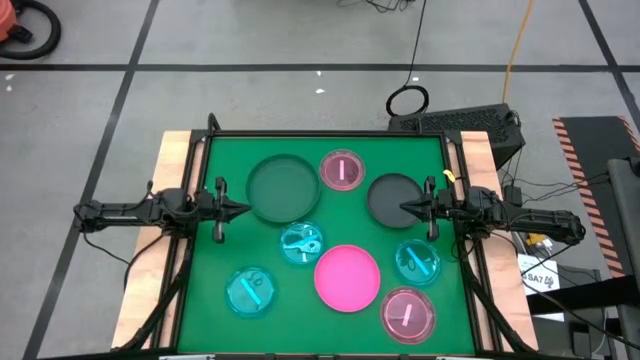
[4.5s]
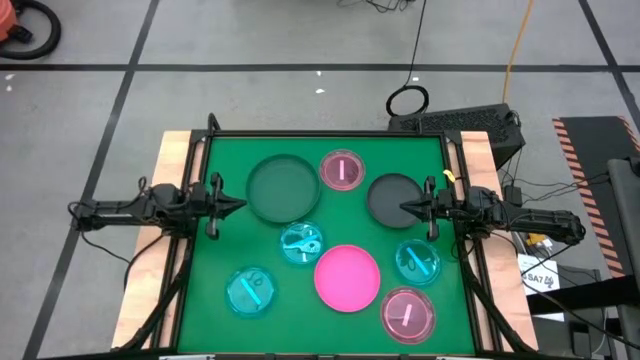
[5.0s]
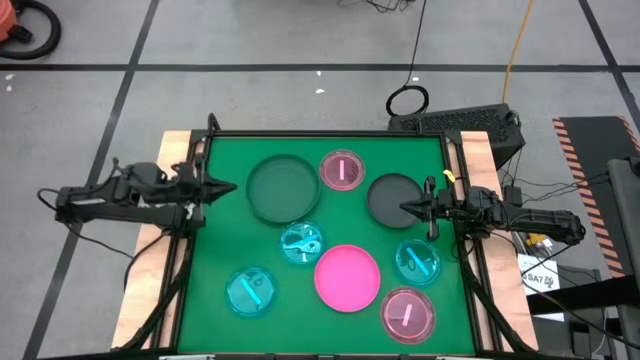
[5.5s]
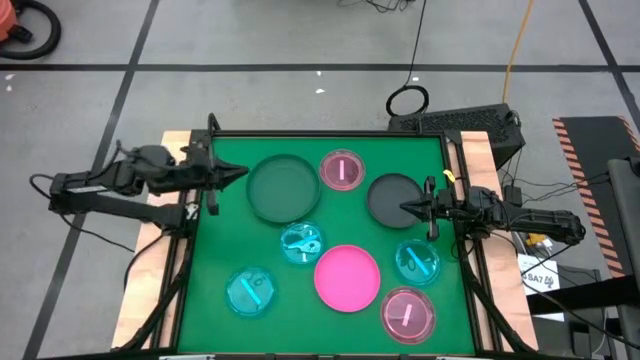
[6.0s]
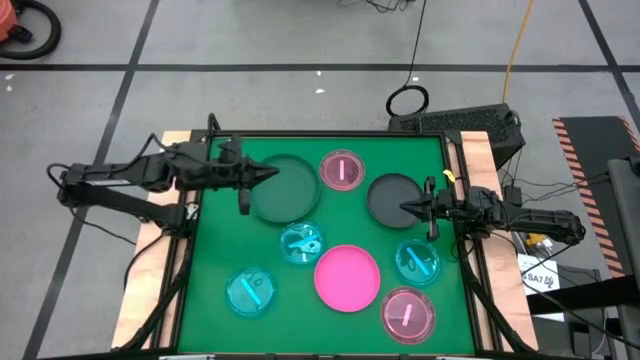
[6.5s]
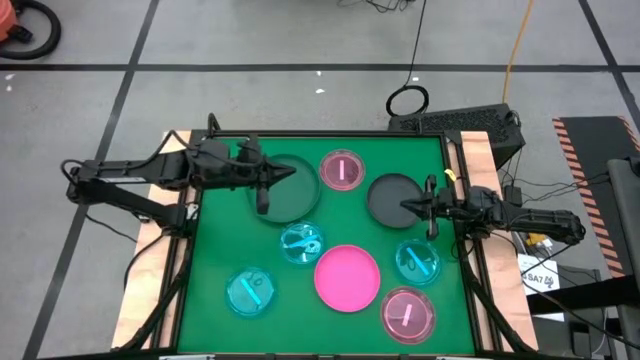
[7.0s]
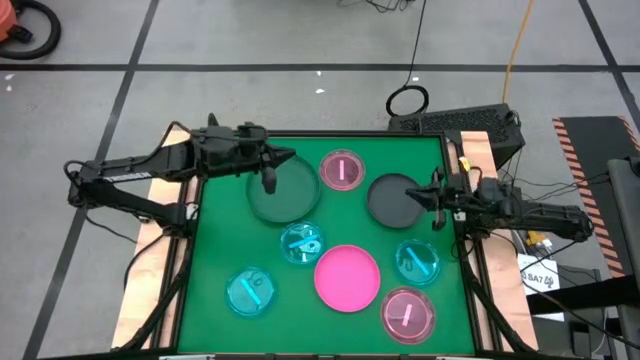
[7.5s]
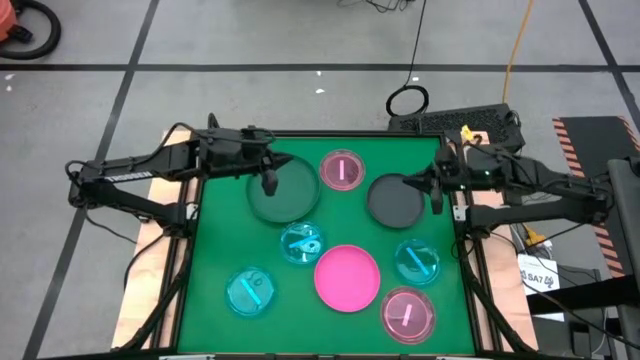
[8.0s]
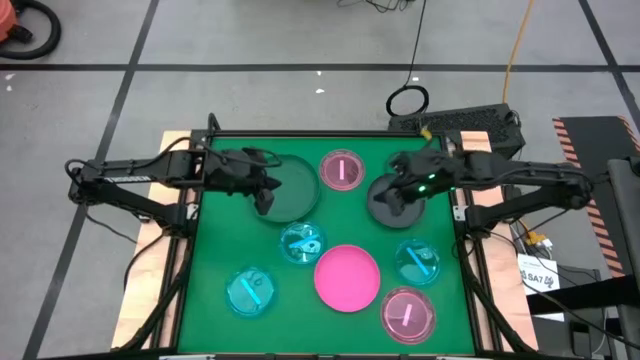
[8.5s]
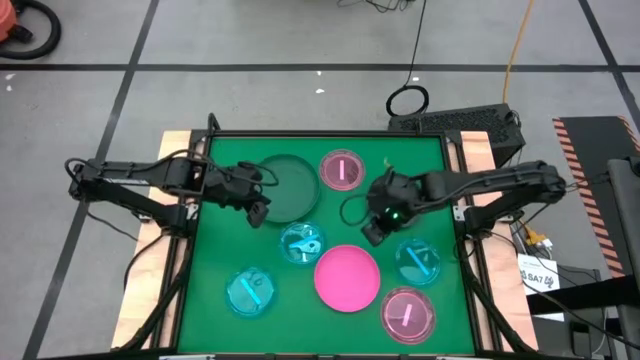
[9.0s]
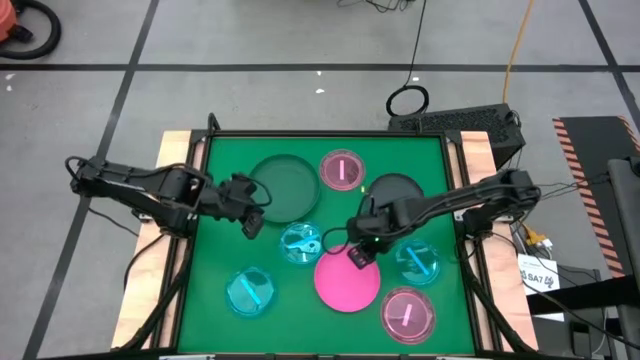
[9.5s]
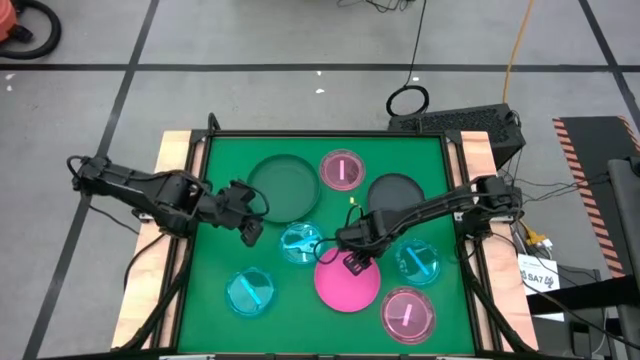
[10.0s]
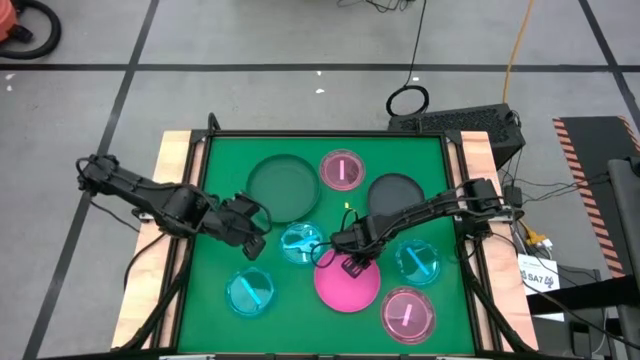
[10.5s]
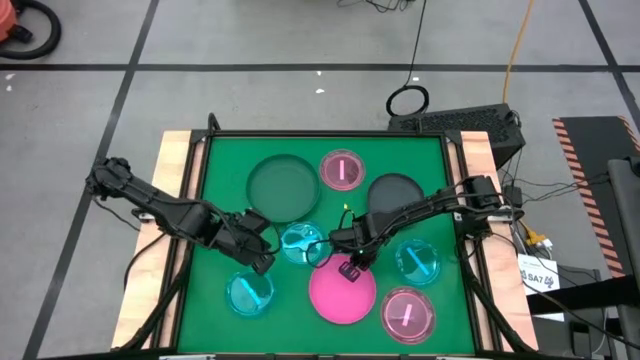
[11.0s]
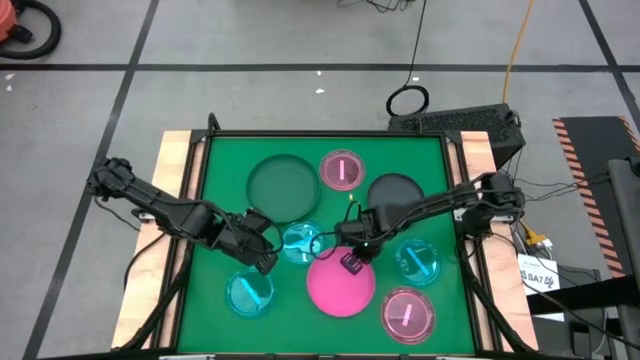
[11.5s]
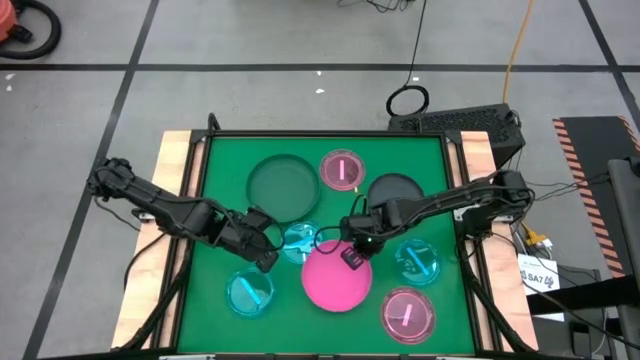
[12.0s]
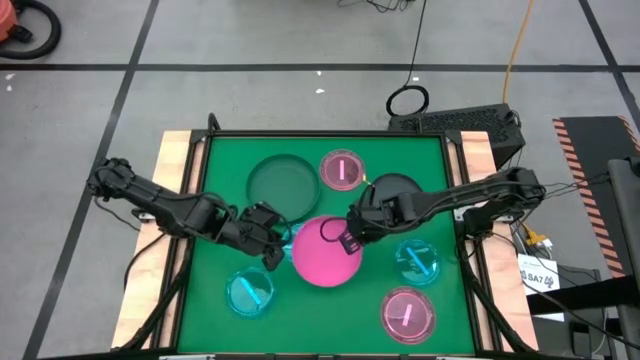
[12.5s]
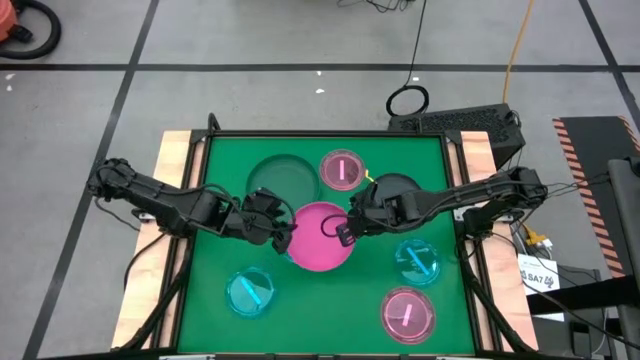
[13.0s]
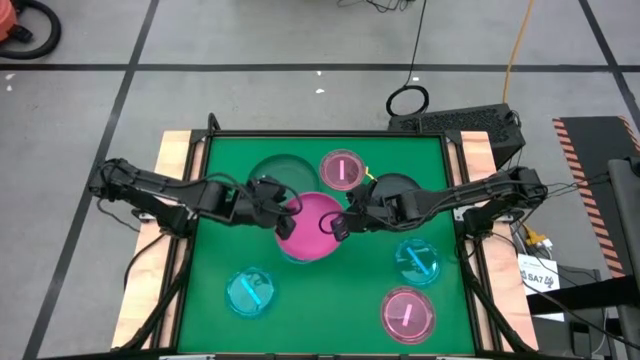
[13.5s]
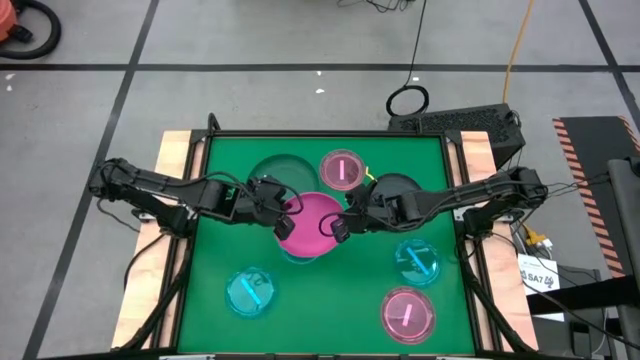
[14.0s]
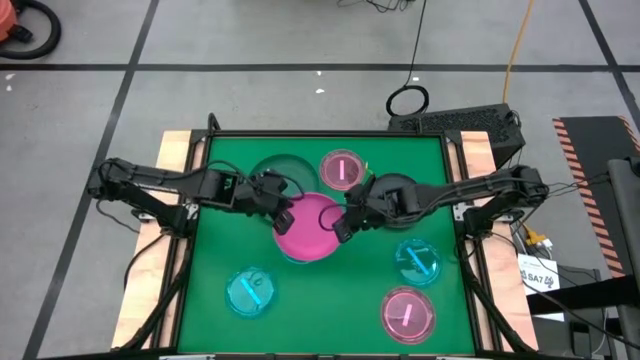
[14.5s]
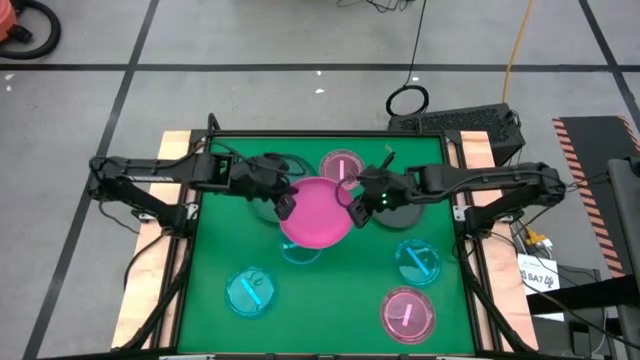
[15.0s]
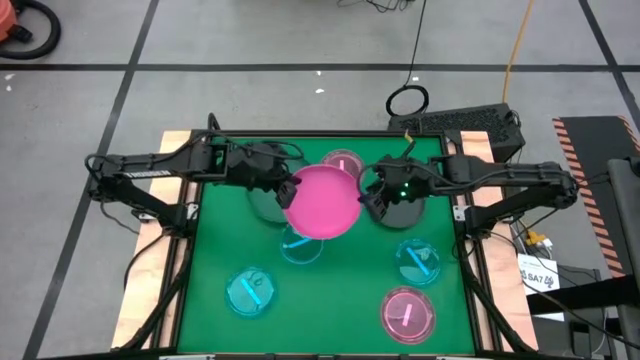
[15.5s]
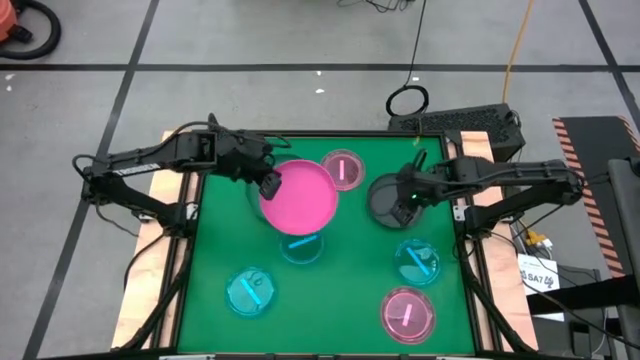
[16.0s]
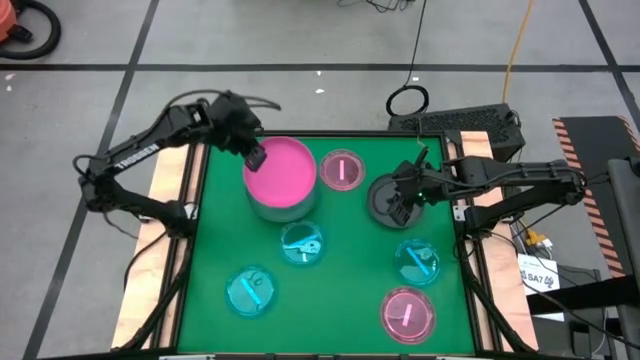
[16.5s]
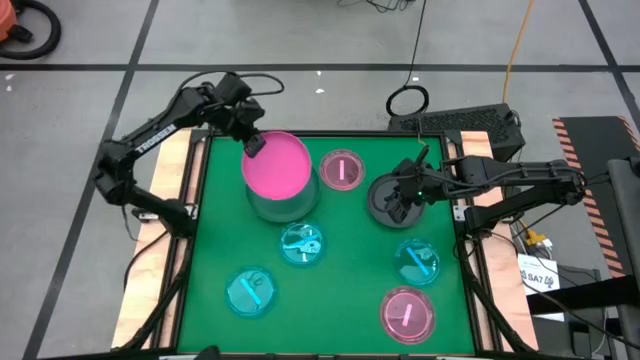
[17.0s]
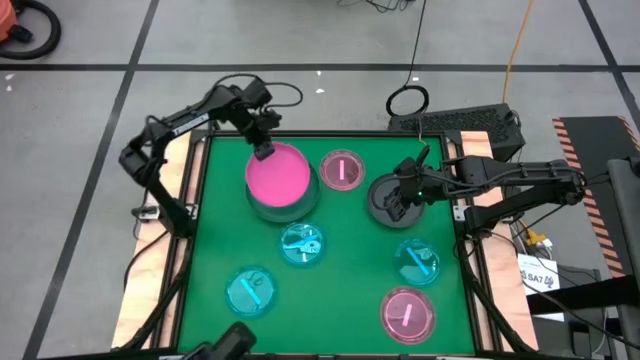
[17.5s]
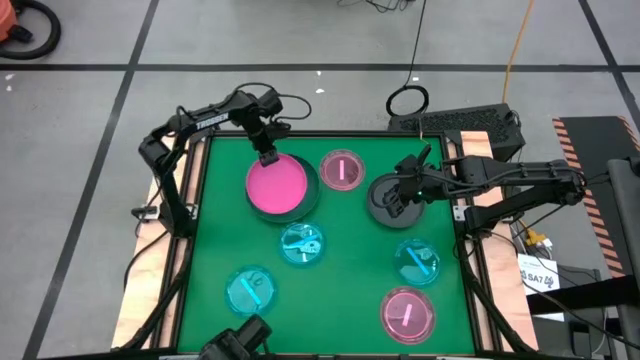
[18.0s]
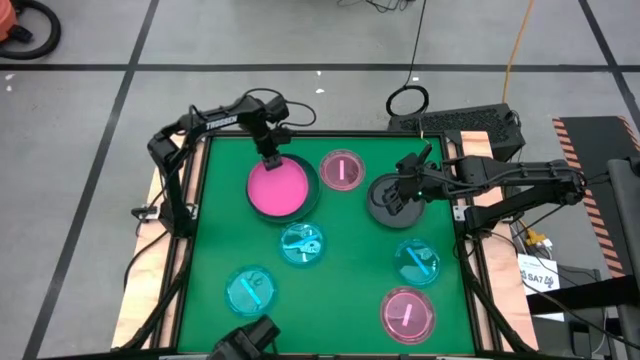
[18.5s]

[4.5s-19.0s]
Task: Stack plastic plates
Stack the pink plate on the green plate

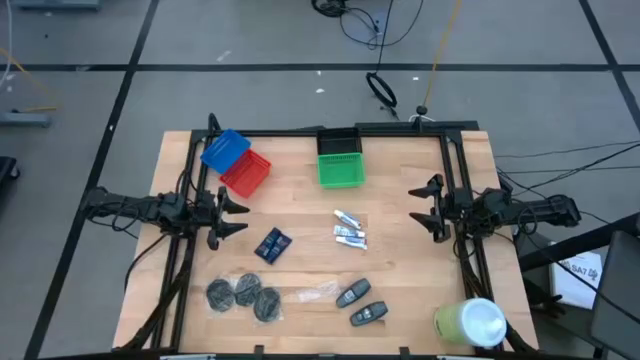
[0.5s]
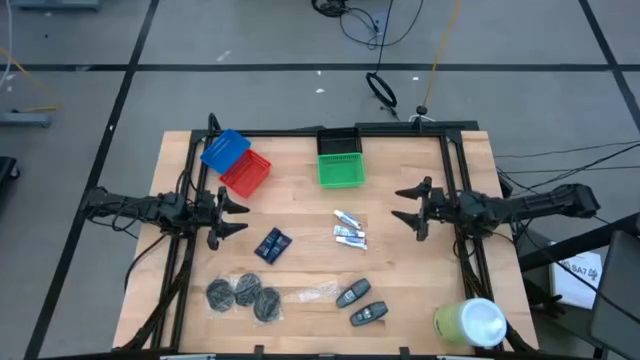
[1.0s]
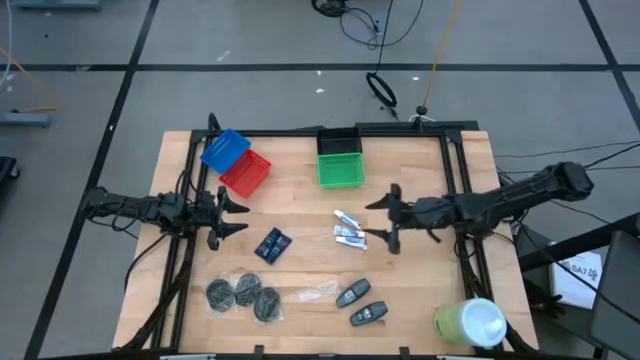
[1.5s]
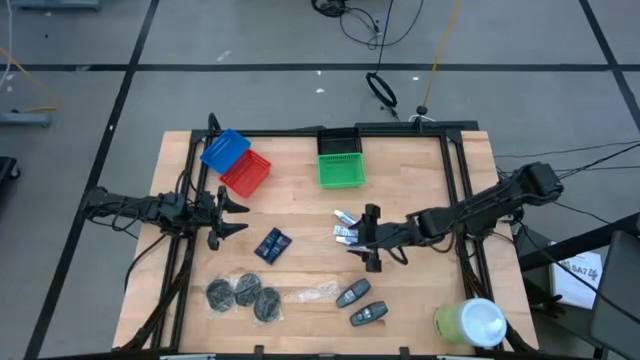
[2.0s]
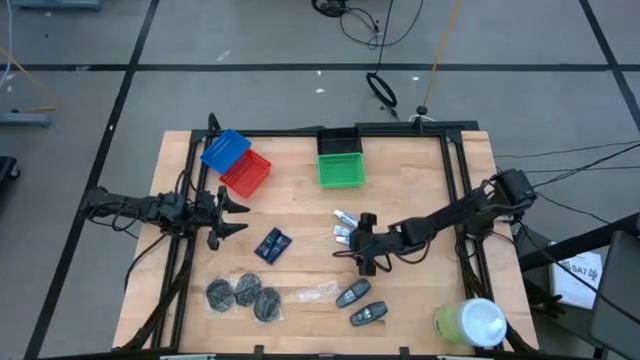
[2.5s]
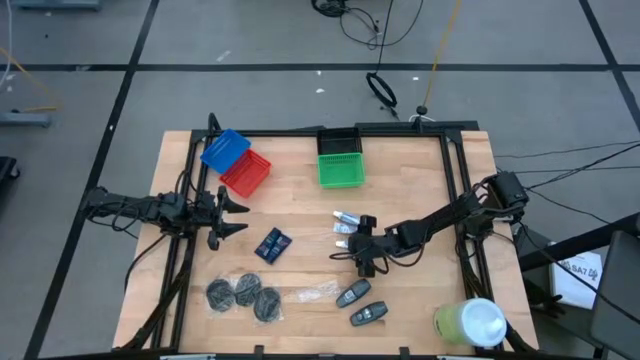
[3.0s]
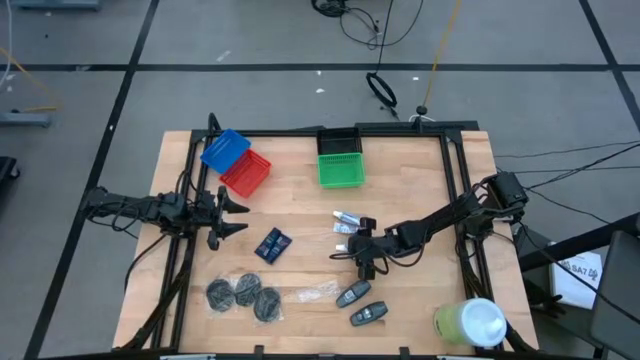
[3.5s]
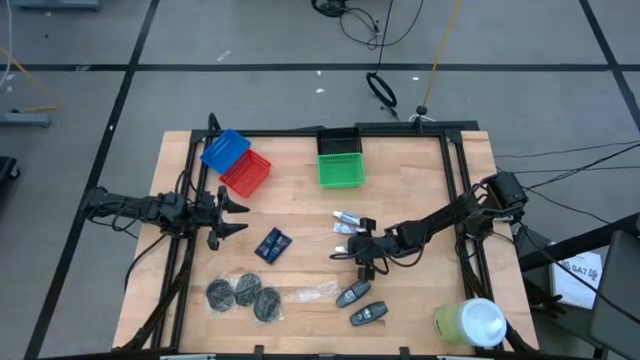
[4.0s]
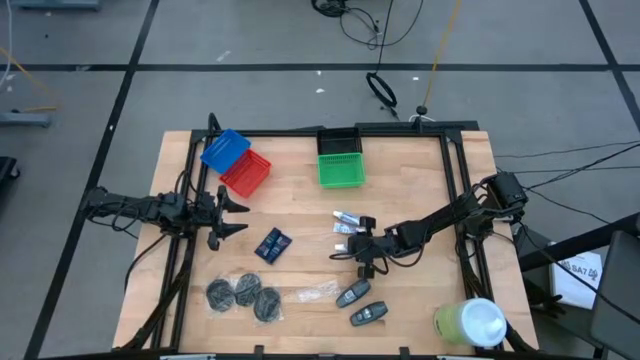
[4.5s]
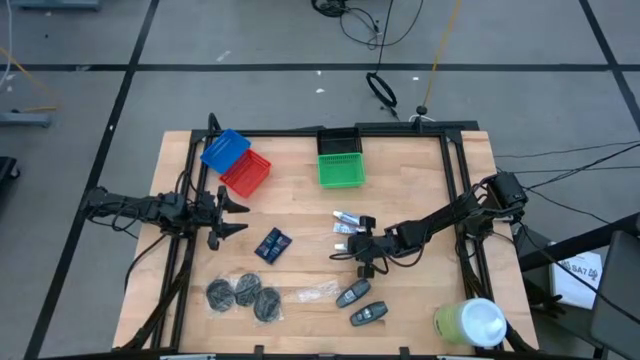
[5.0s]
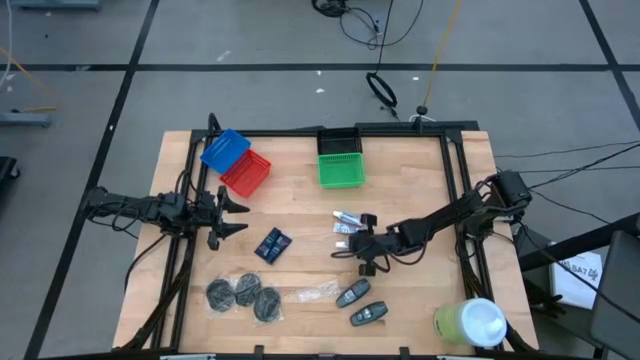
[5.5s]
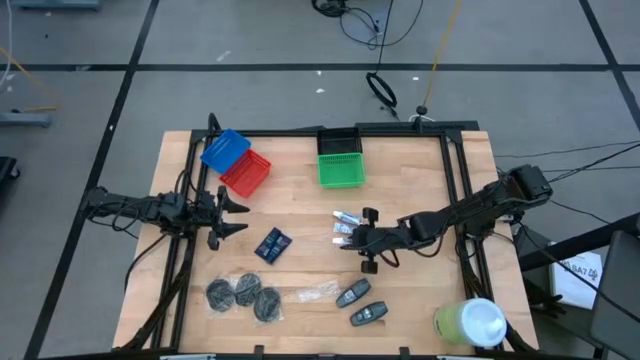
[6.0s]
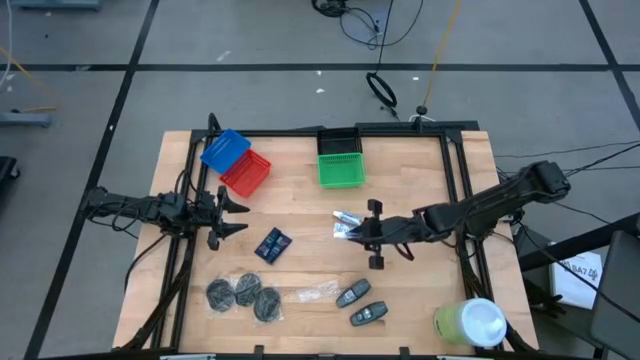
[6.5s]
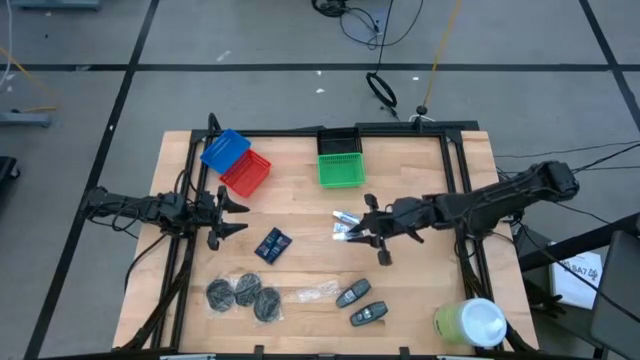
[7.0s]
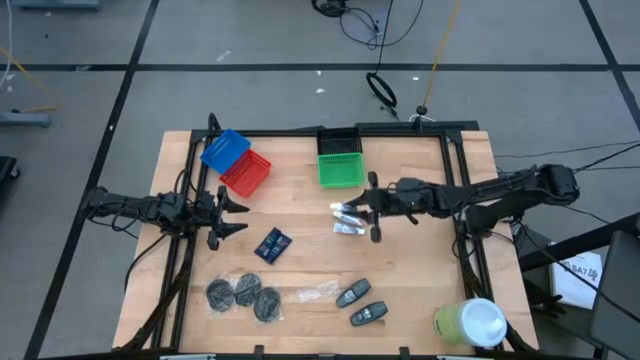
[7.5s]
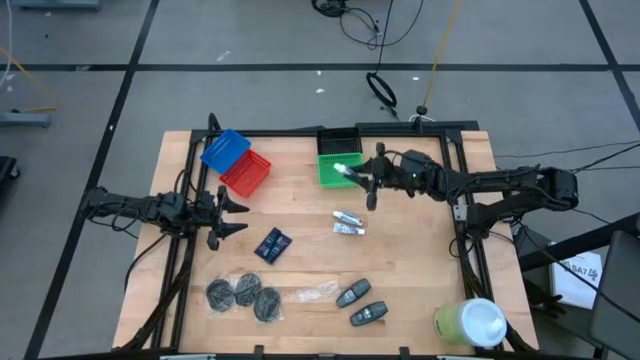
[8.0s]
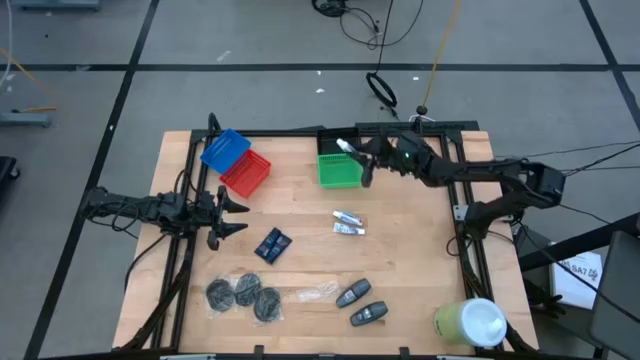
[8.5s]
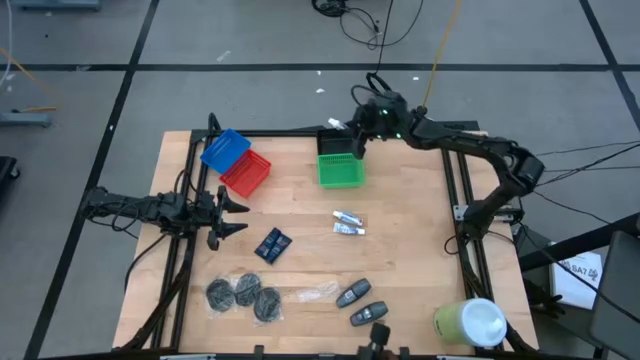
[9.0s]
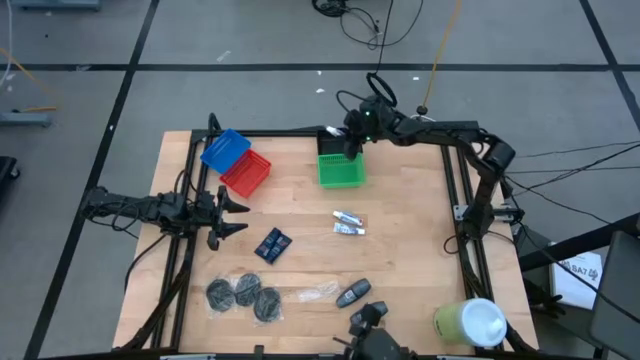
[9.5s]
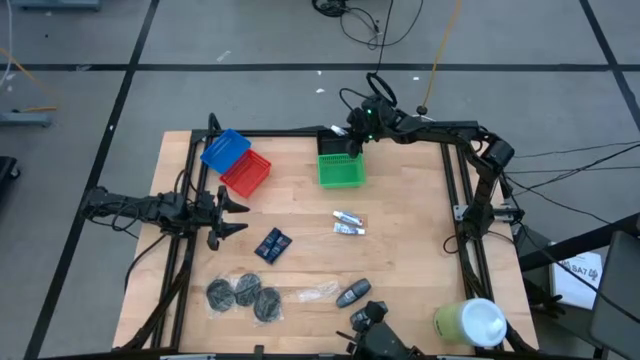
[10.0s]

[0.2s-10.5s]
Task: Pick & Place Travel size toiletries
Put the bottom white toothpaste into the black bin
